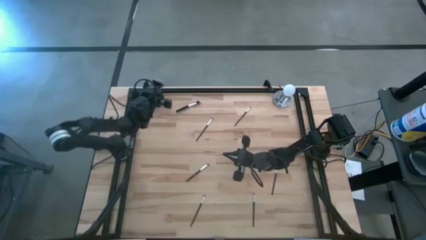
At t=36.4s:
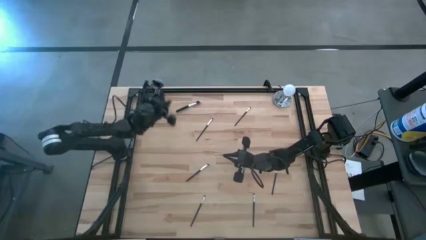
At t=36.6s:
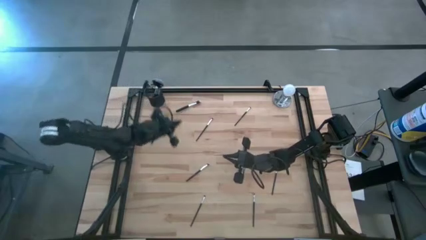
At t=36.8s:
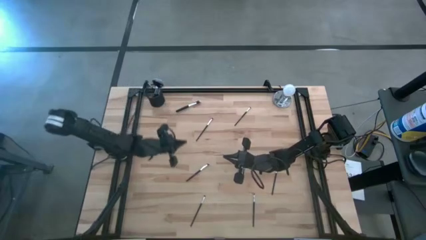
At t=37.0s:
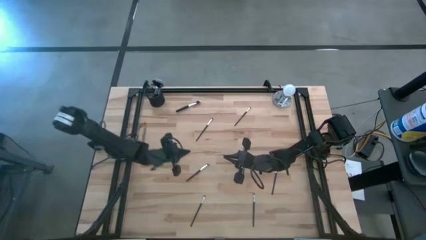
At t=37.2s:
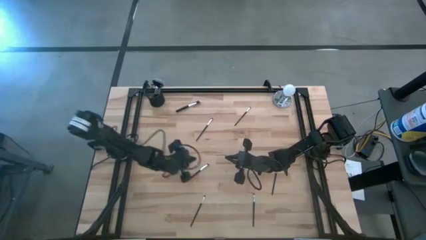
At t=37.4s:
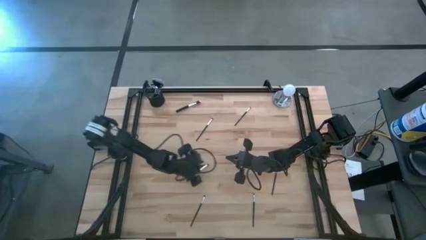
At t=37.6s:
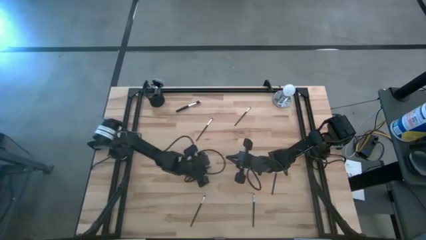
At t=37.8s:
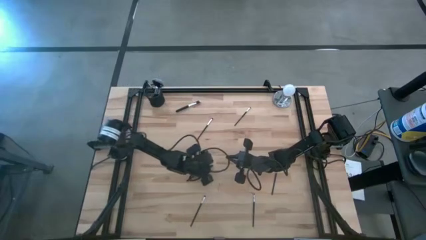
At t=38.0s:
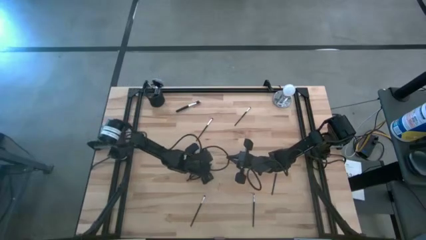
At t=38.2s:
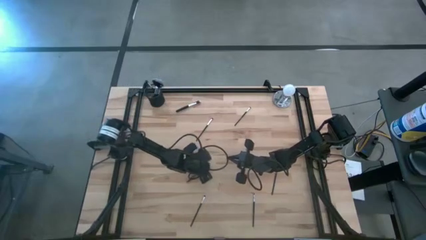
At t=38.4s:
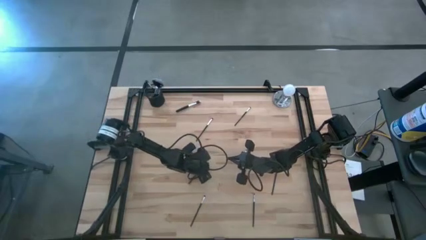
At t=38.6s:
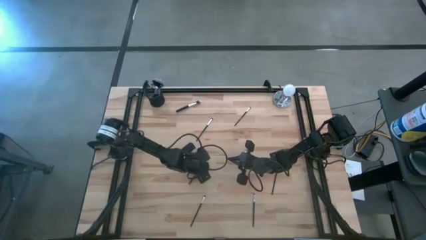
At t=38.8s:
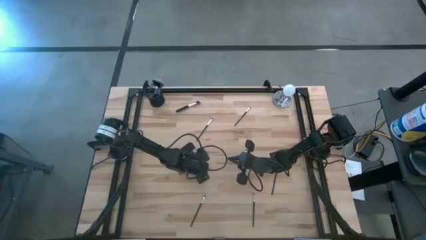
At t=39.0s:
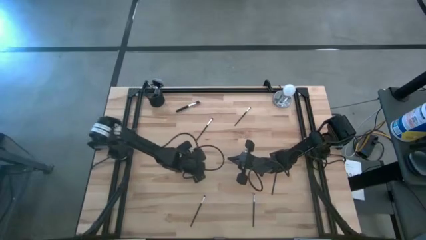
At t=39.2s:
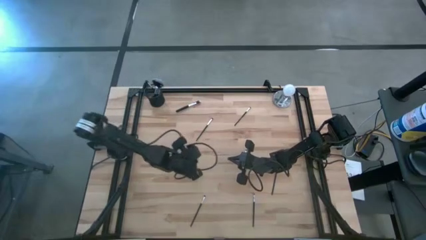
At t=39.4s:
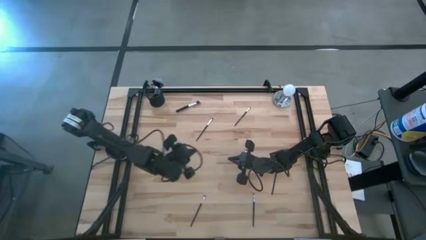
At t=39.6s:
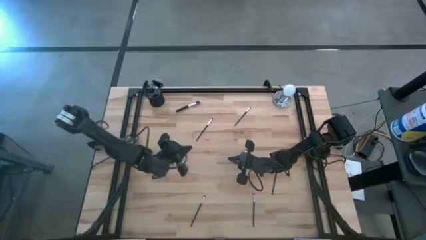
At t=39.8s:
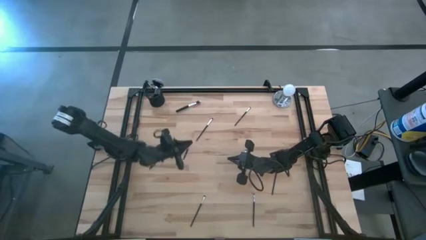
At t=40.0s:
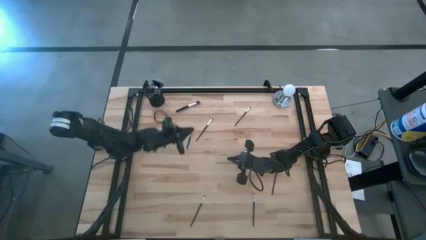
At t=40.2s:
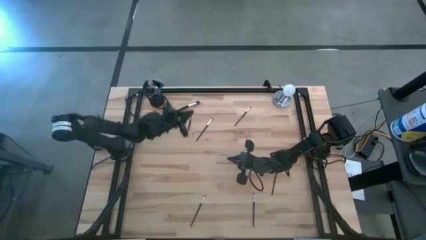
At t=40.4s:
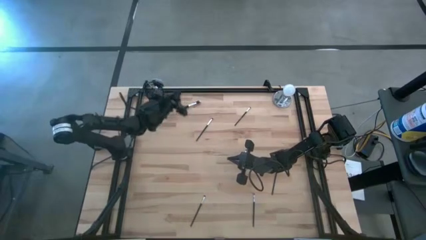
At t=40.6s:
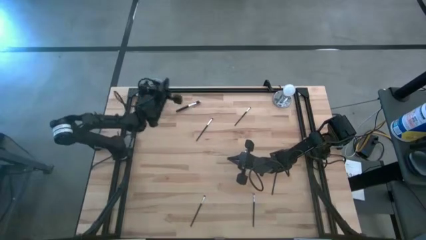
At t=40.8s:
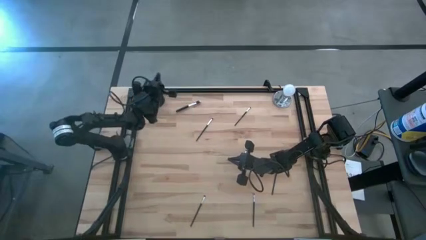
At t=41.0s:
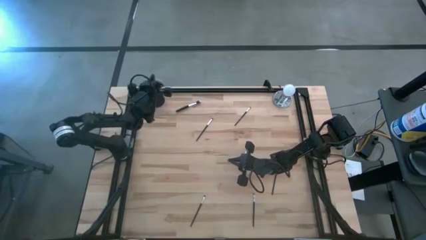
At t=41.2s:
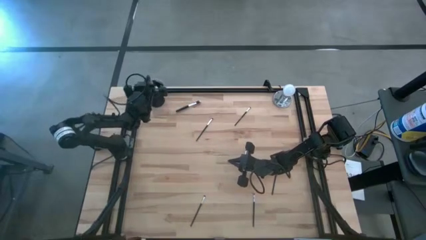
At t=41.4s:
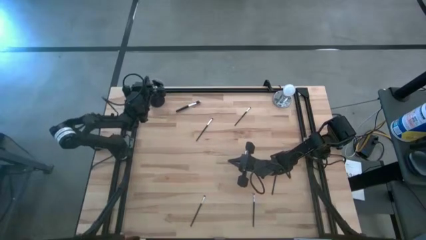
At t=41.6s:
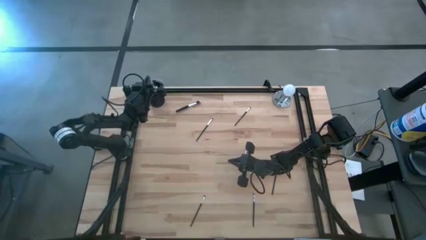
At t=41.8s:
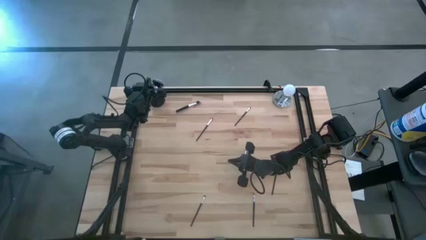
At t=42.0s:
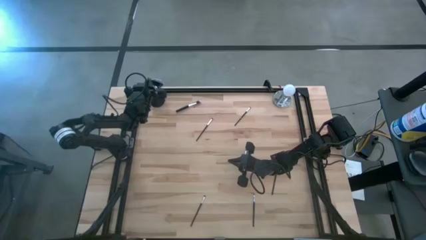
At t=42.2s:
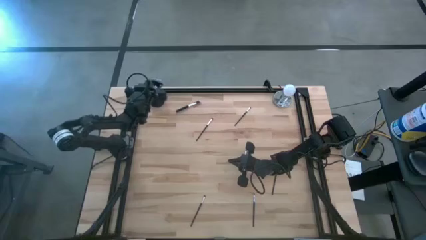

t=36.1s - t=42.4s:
Task: Pick & Place Makeup Supplies
Put the makeup brush into the makeup holder

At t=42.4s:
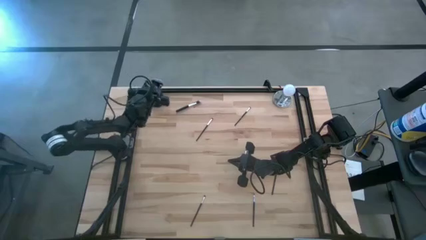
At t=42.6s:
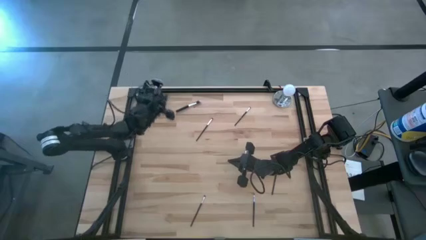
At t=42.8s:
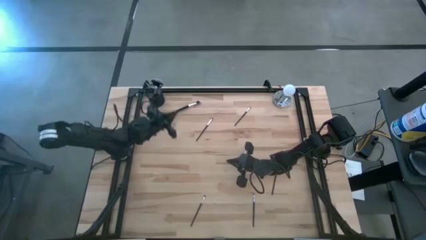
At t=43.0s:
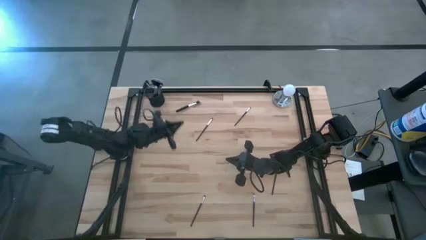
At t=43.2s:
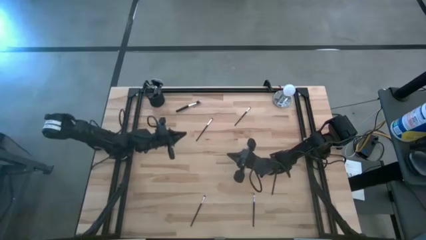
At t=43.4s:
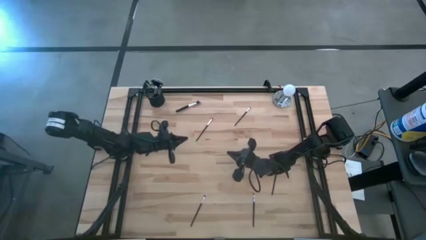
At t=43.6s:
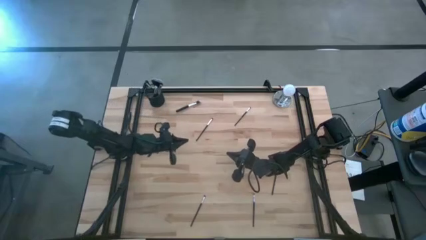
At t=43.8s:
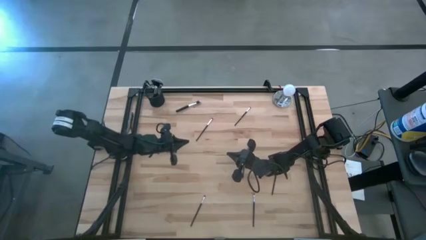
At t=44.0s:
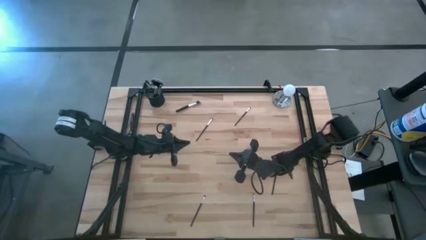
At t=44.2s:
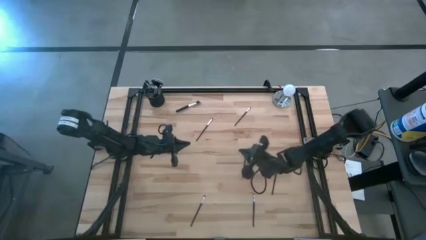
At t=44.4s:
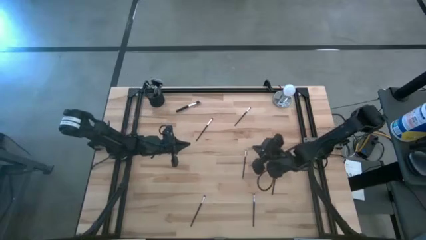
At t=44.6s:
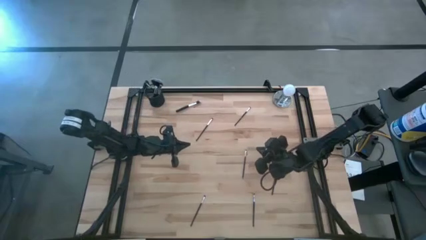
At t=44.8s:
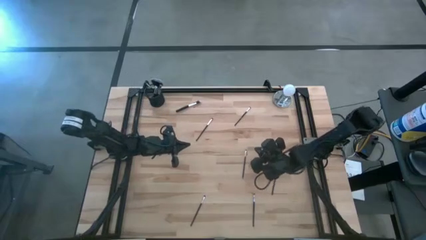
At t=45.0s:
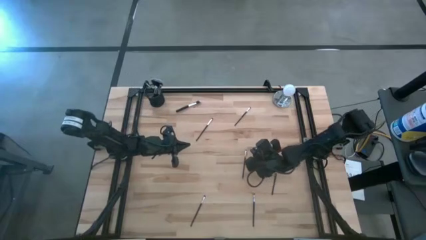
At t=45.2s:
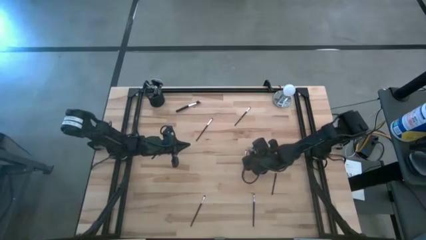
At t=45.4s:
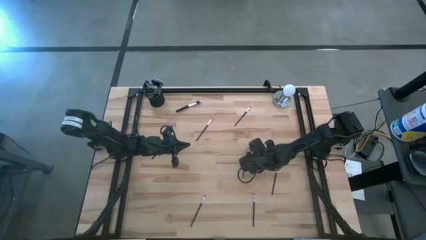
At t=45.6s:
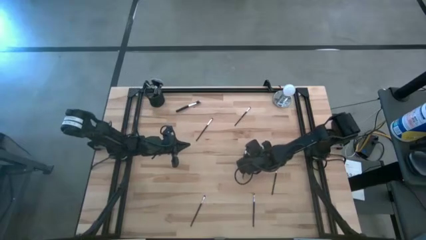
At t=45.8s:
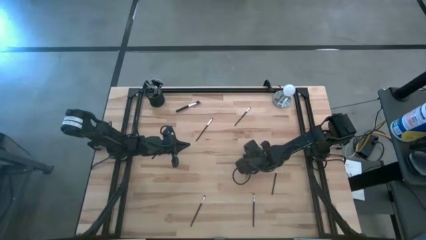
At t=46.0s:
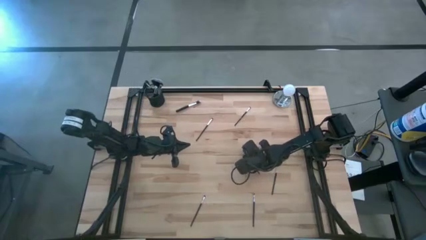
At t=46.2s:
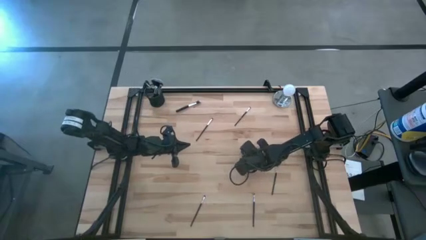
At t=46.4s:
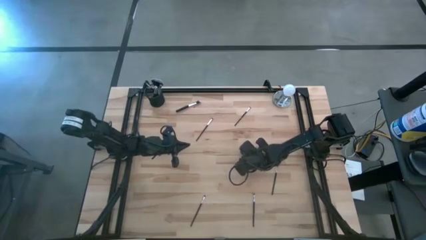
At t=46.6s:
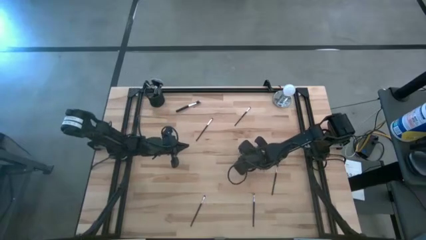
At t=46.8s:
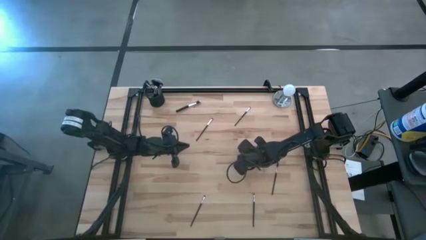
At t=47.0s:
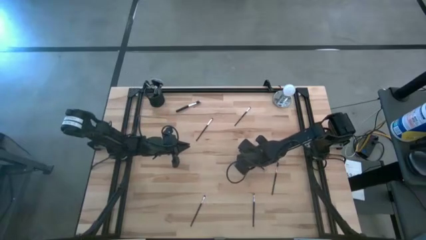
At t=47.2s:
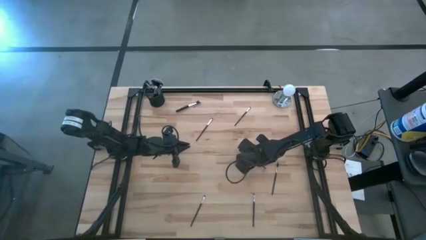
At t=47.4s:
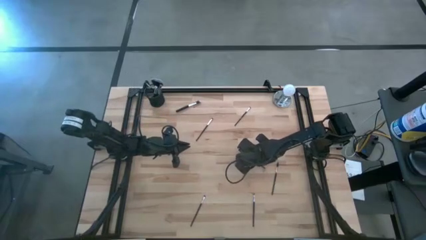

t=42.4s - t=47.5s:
Put the makeup brush into the makeup holder

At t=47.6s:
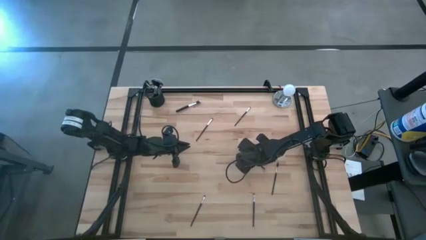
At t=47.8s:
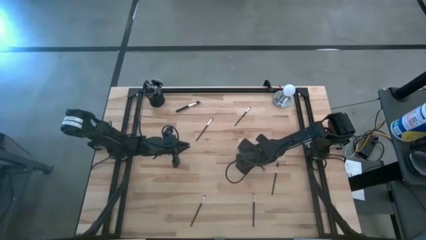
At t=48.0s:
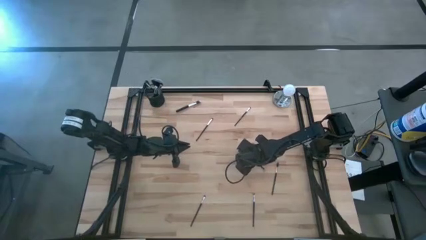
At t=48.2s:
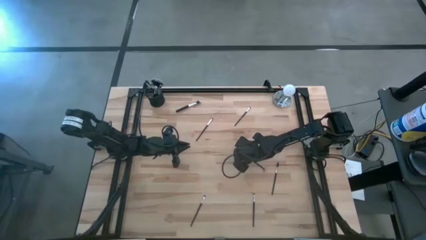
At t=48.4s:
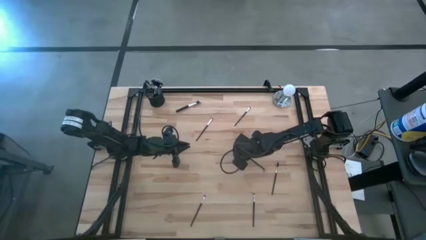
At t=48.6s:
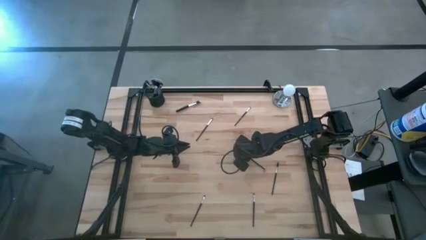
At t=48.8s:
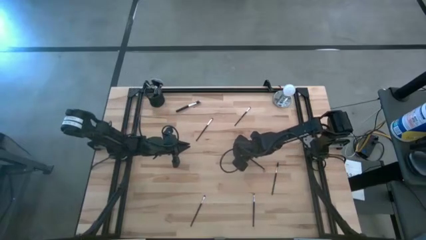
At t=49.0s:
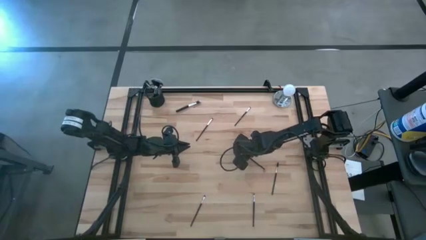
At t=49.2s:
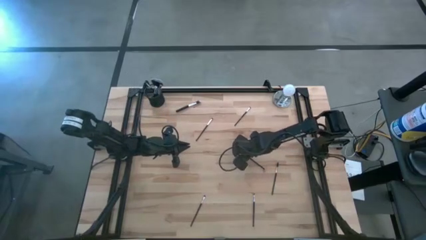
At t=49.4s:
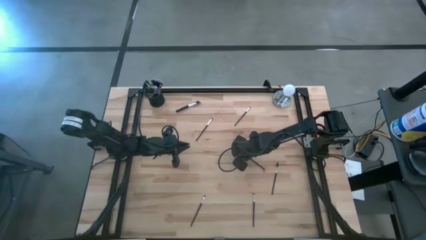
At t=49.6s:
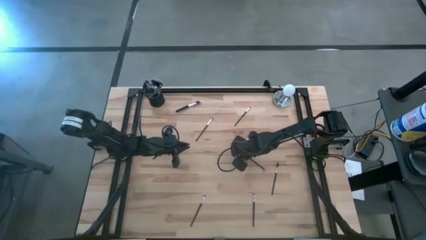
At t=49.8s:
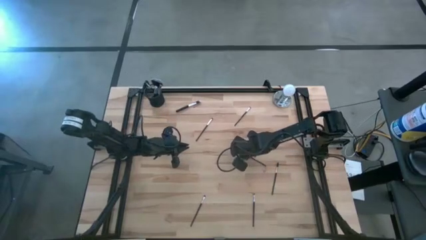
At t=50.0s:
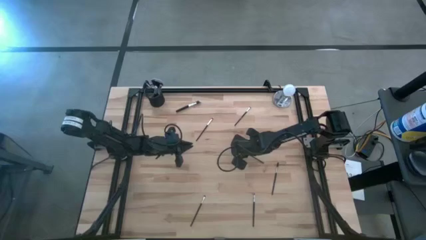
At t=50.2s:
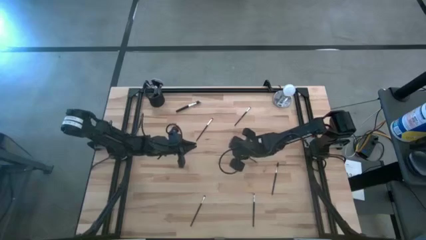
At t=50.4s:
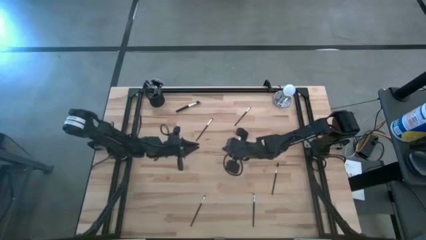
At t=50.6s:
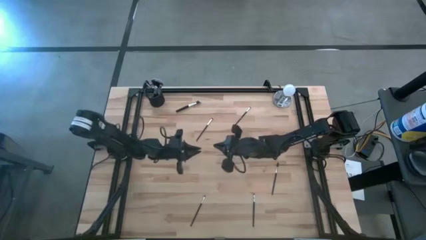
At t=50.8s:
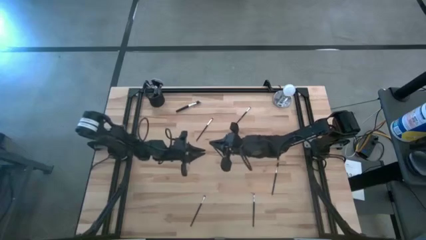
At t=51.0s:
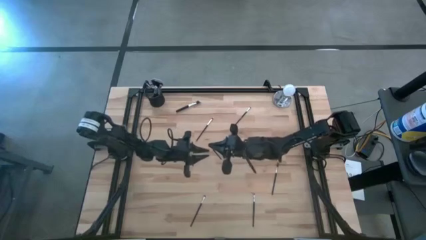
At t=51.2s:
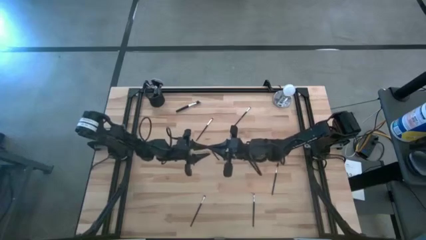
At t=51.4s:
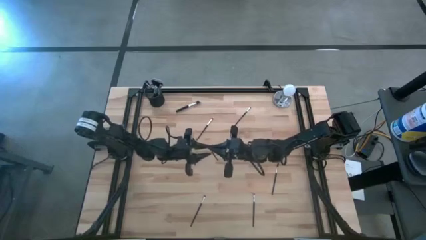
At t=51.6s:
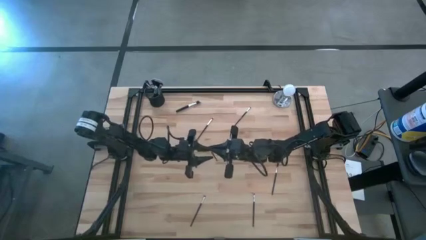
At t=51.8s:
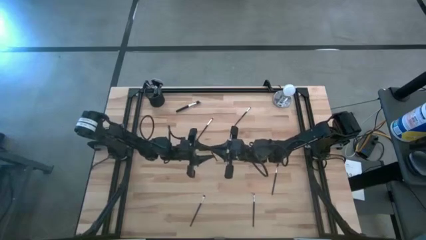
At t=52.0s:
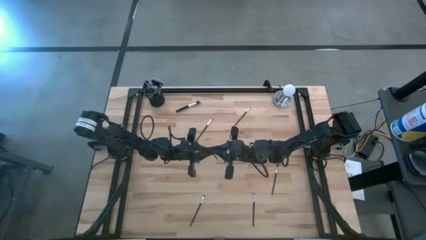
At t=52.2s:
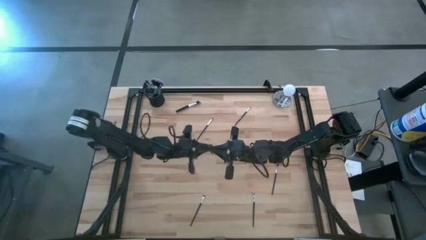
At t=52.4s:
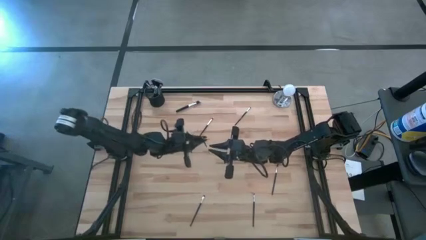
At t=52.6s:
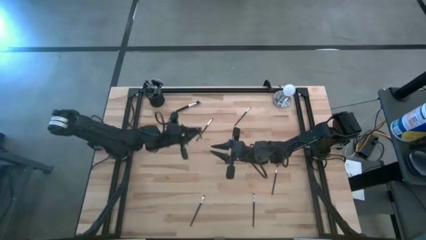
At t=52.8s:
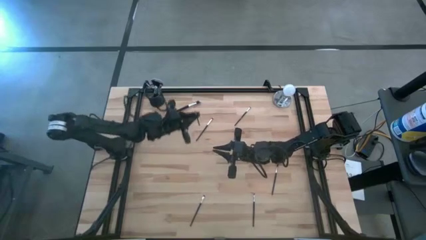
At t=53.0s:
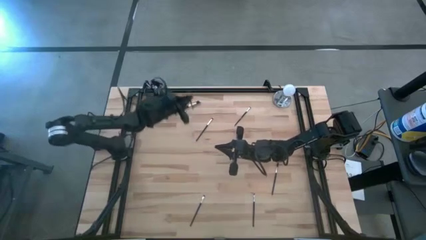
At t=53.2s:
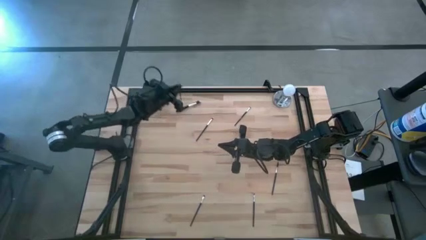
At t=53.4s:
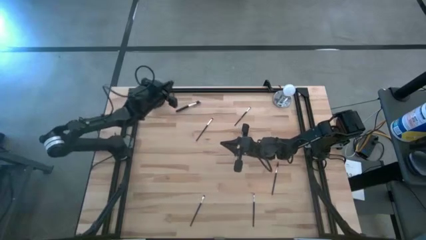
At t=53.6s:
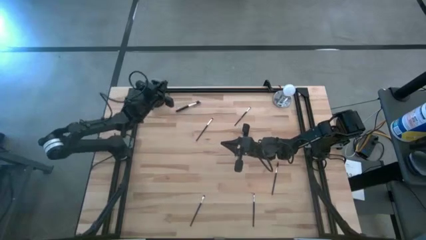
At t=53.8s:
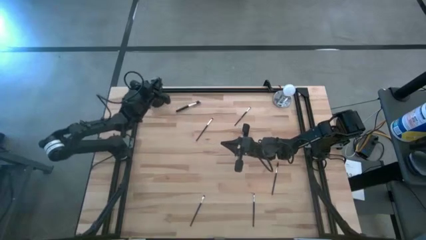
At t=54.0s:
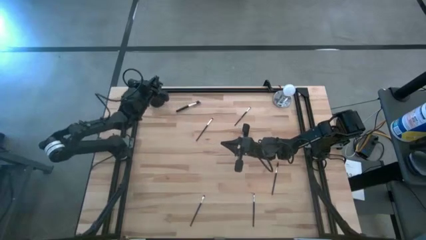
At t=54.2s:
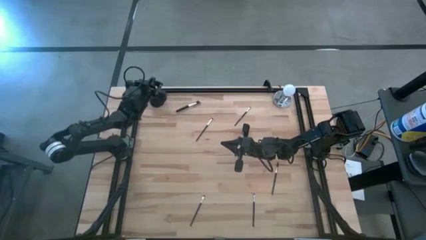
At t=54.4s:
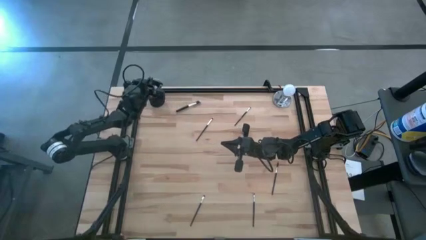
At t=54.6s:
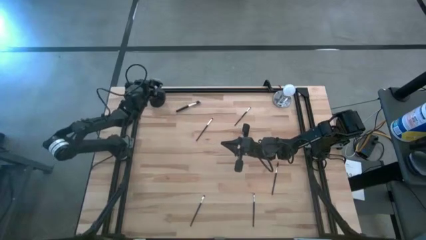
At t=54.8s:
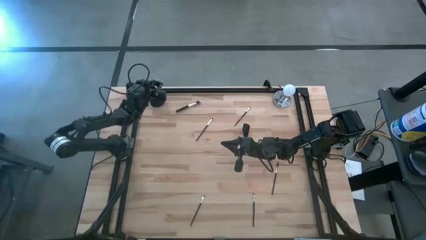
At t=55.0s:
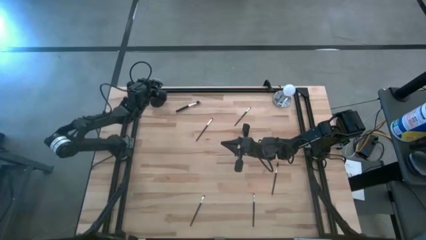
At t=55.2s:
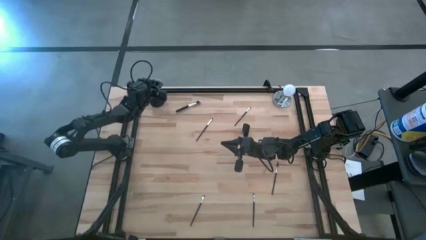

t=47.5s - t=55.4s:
Put the makeup brush into the makeup holder
